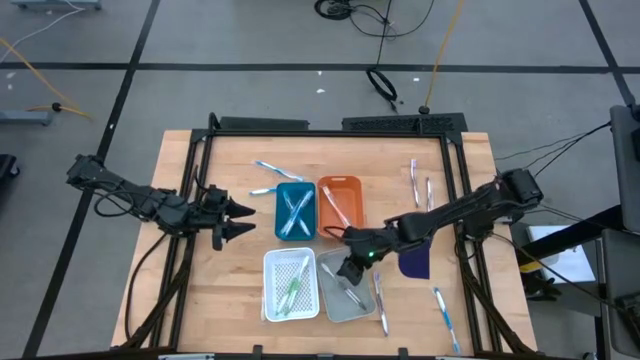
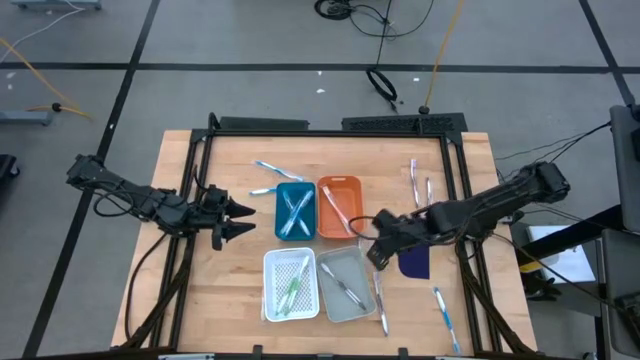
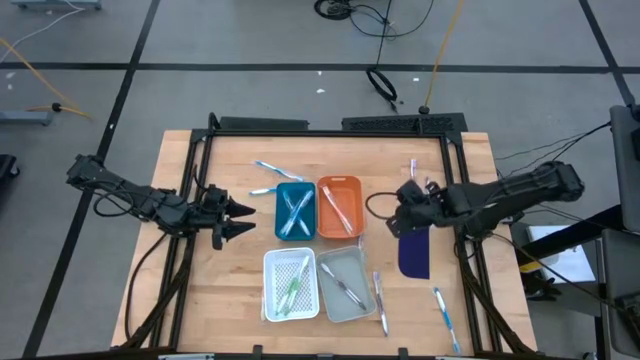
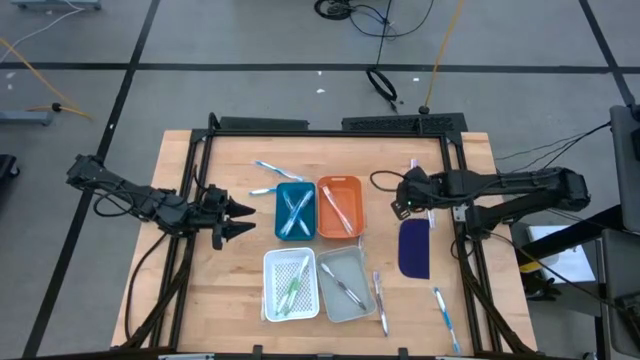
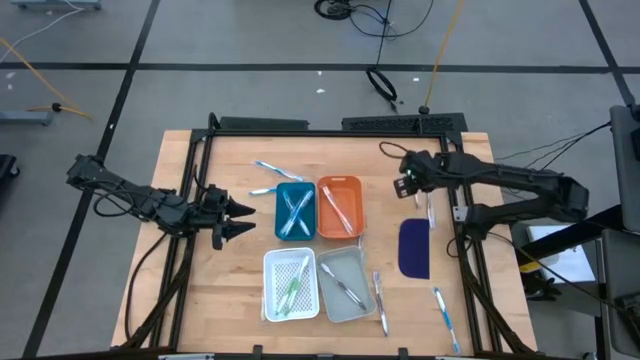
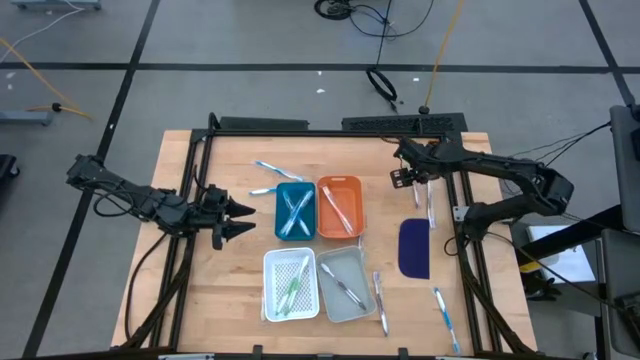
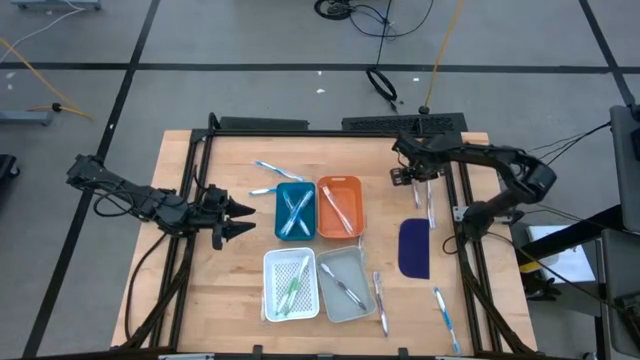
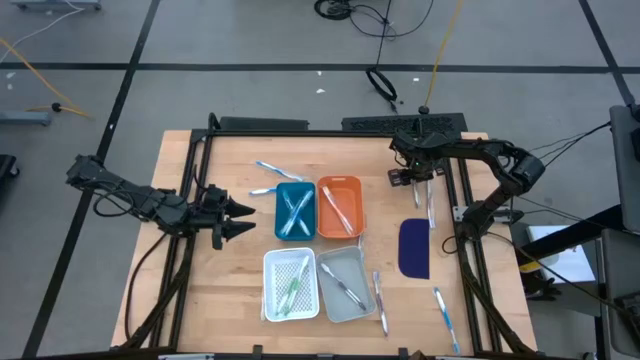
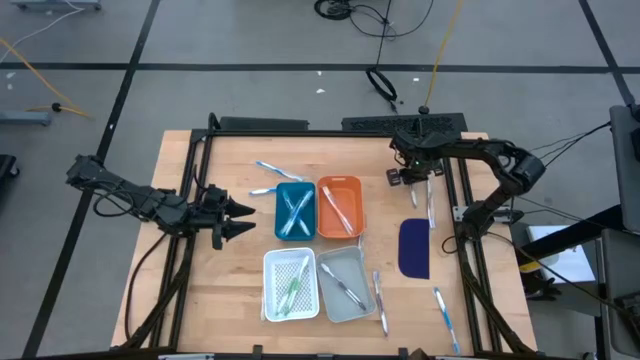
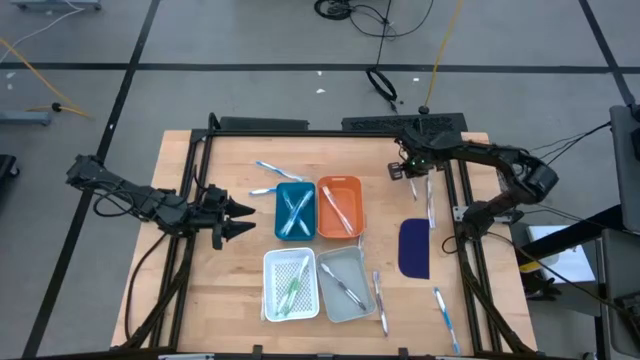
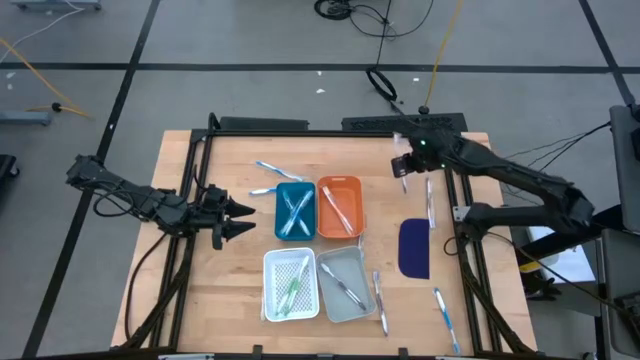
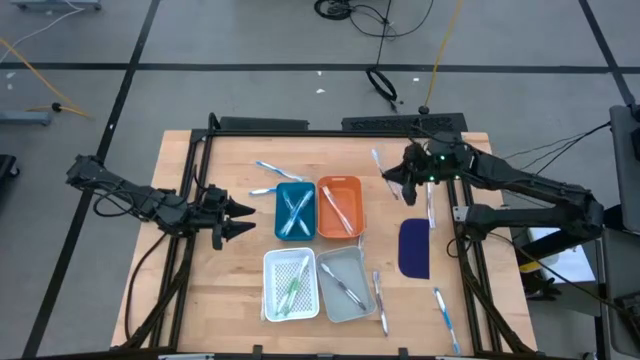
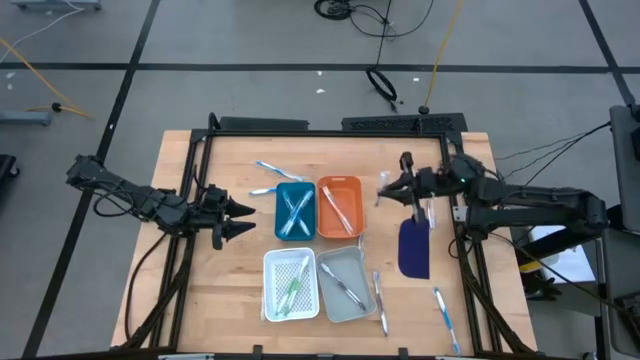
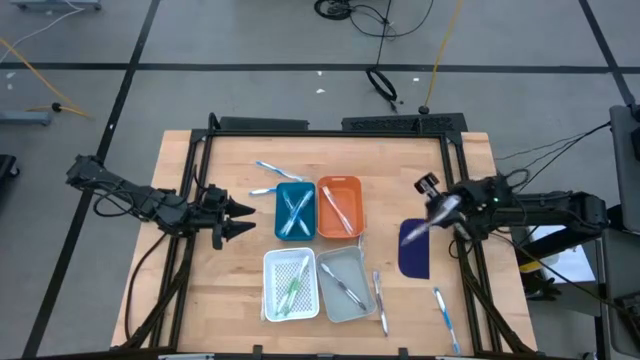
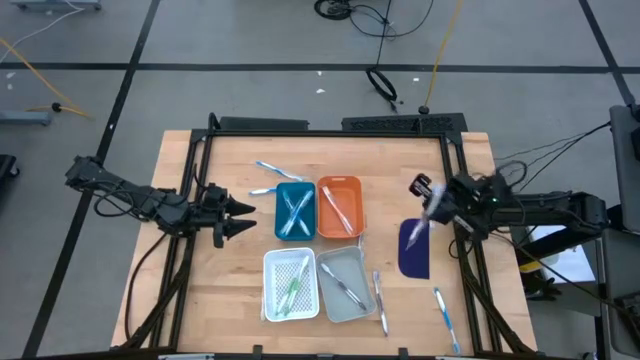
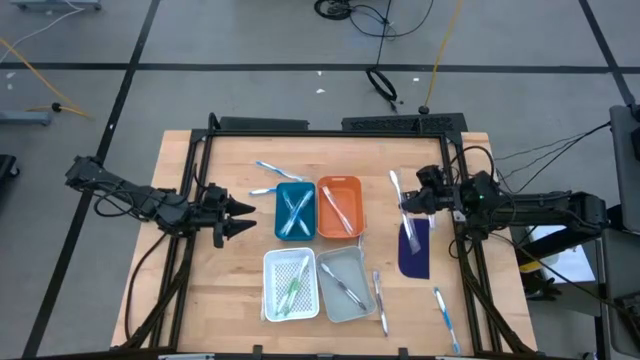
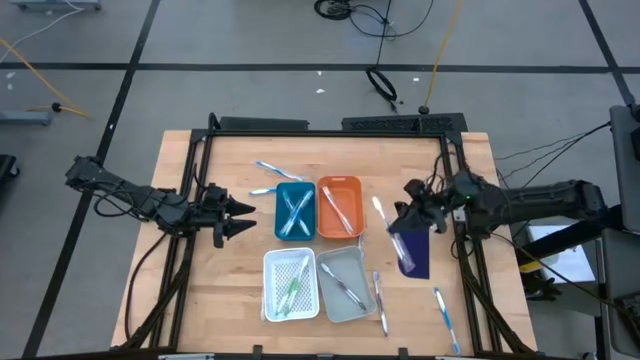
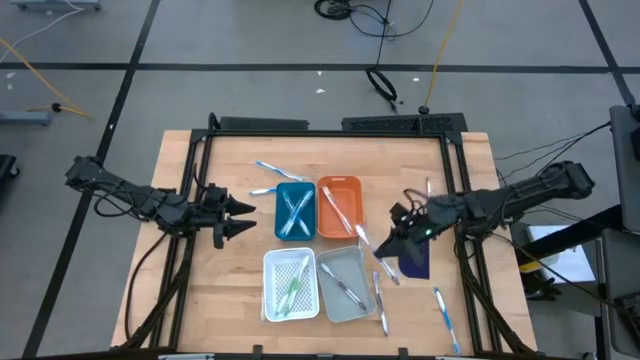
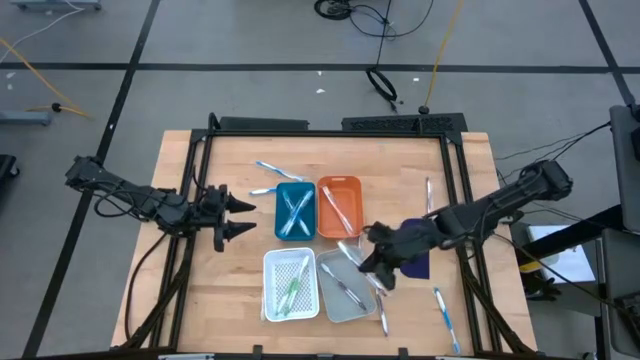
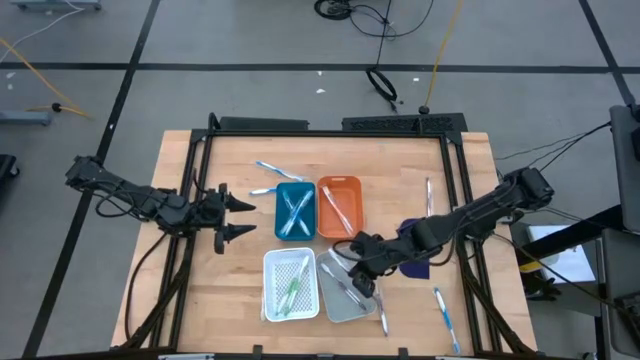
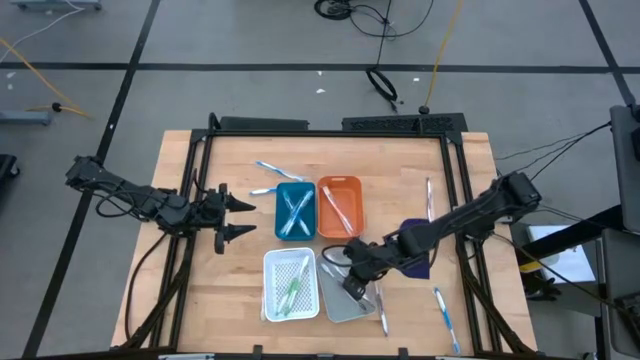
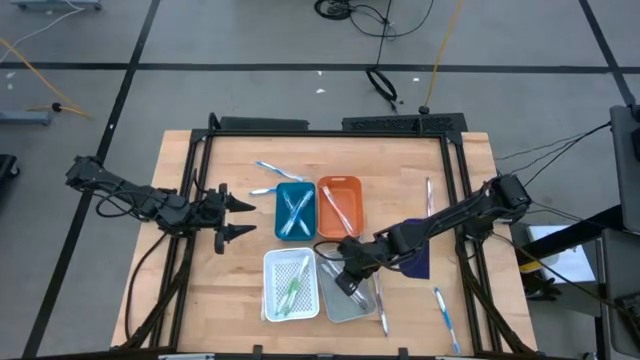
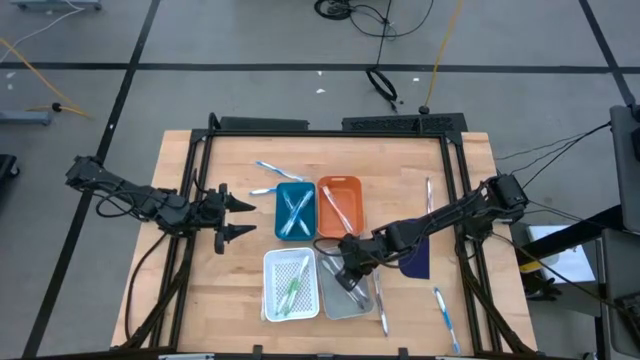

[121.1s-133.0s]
Task: Pick & Place Toothbrushes
Put the purple toothbrush into the gray bin

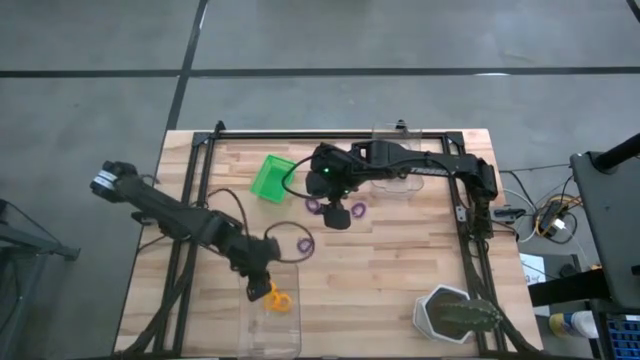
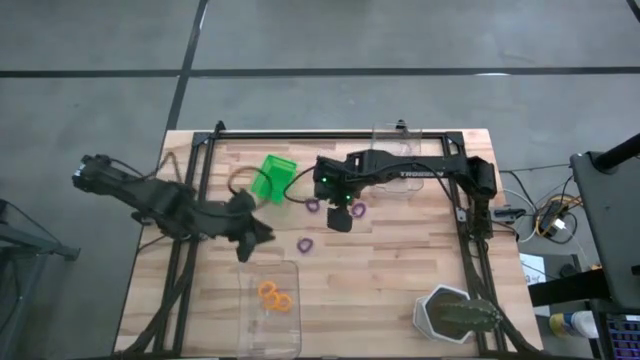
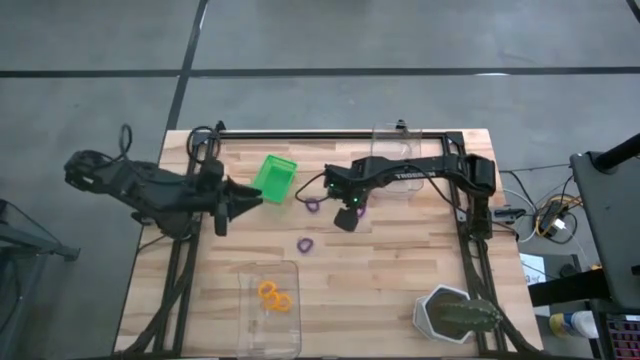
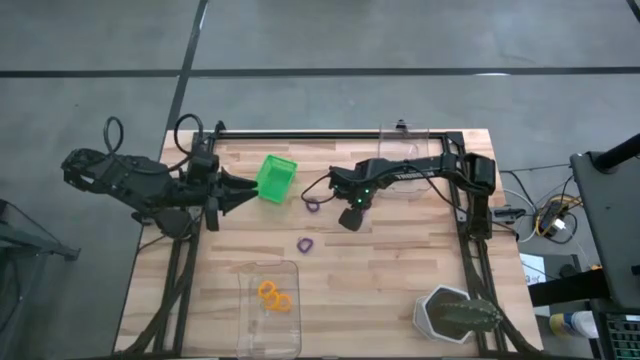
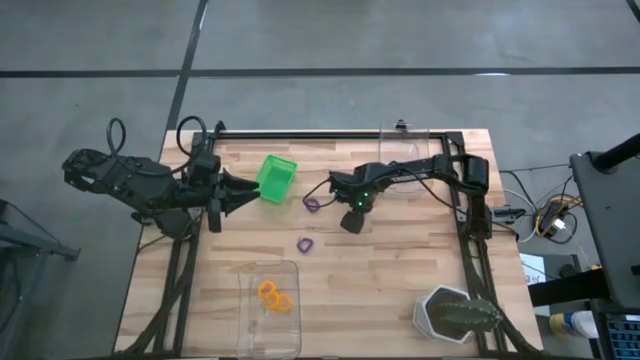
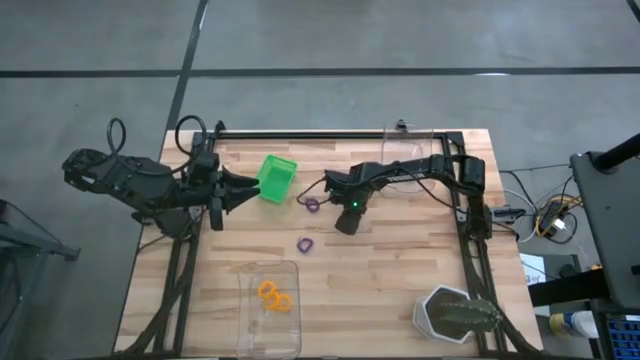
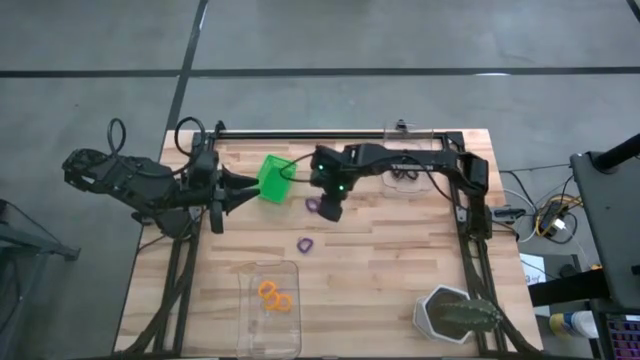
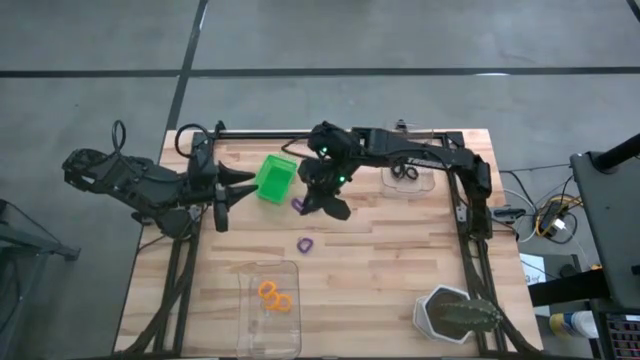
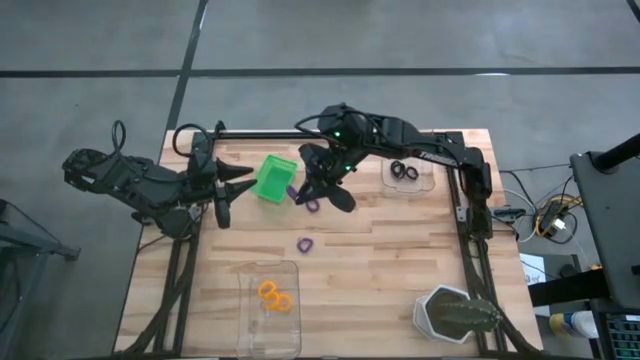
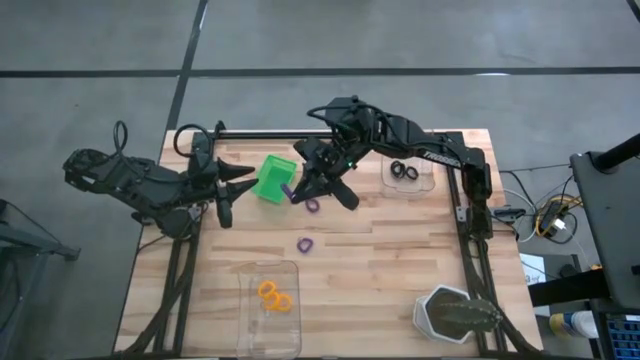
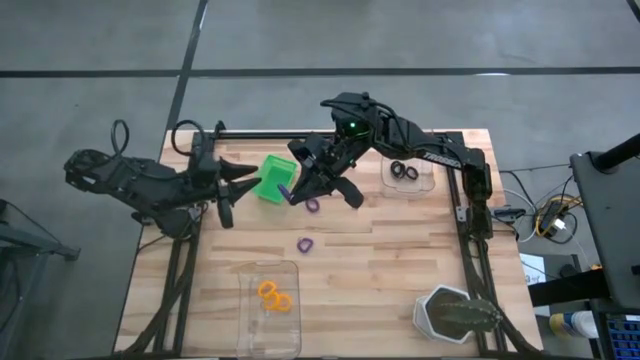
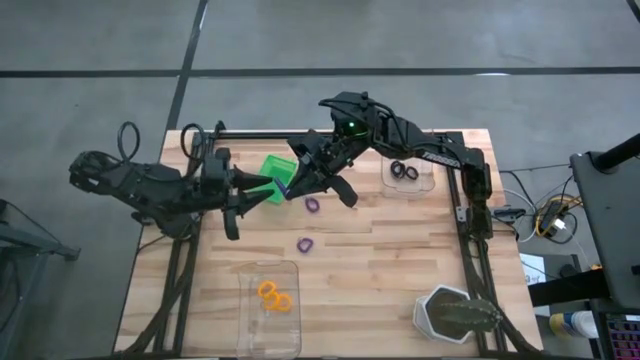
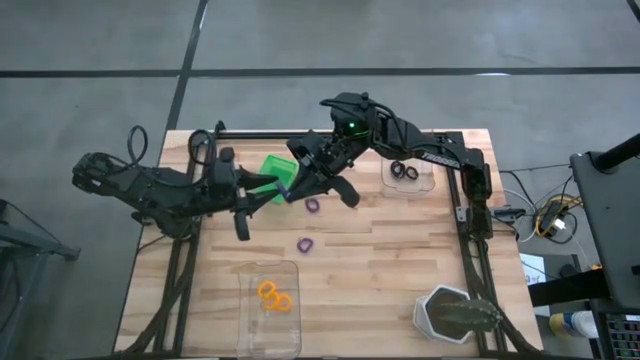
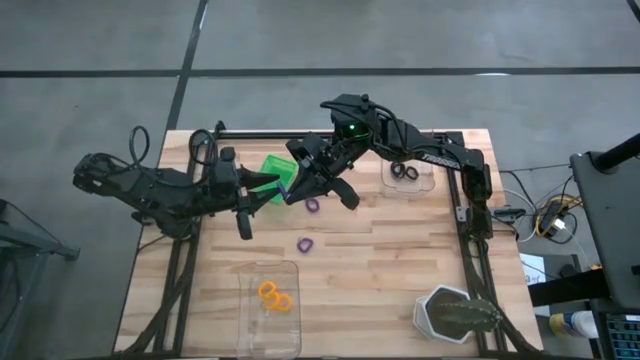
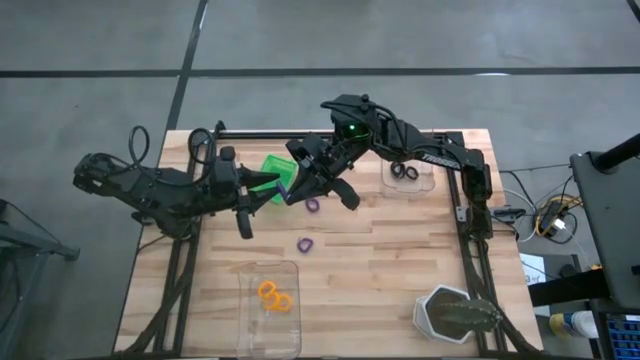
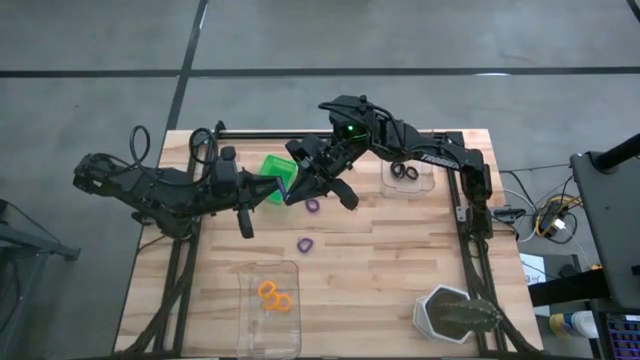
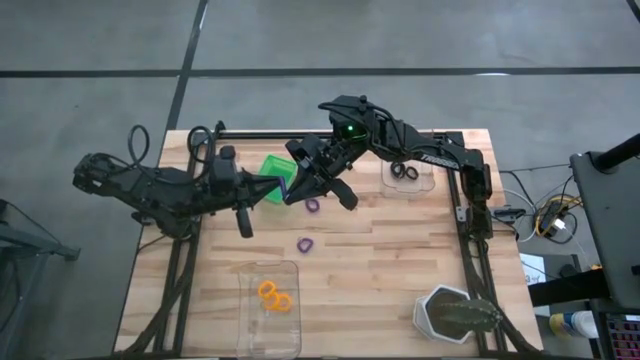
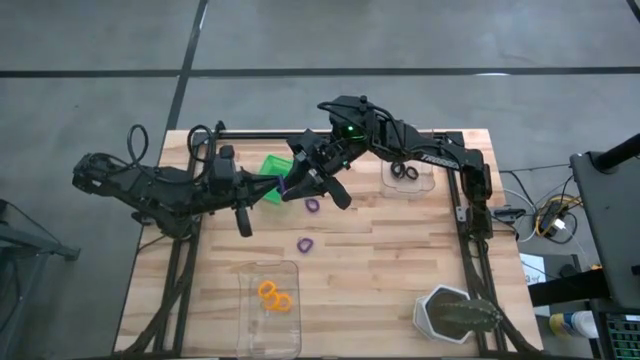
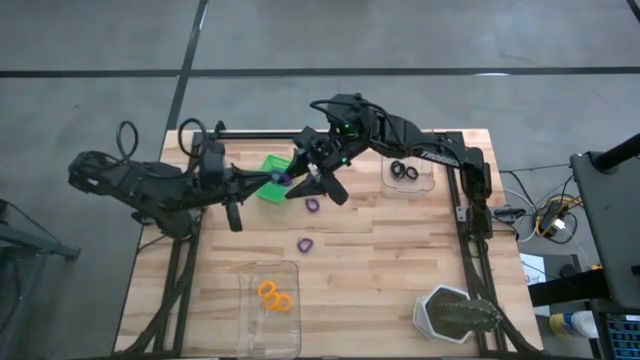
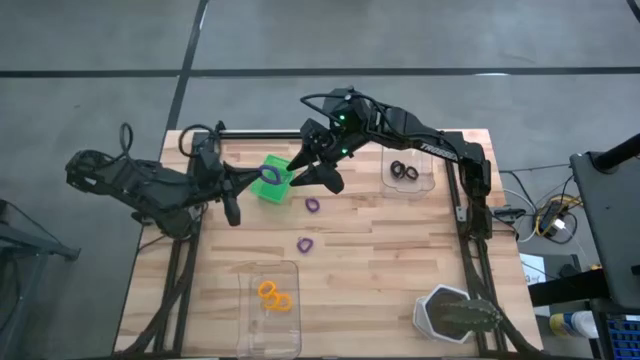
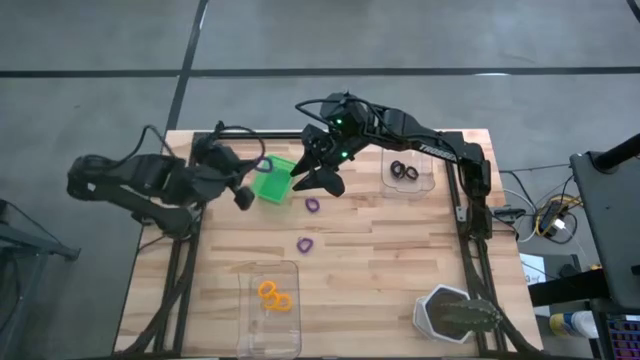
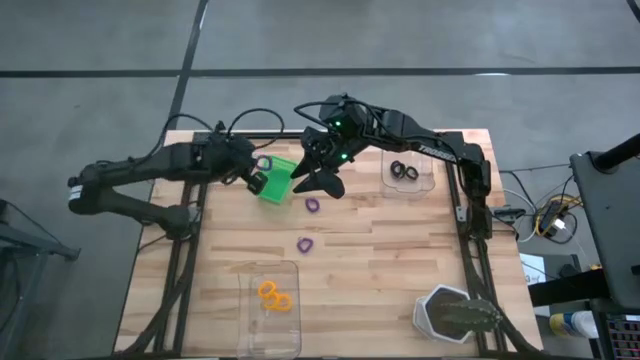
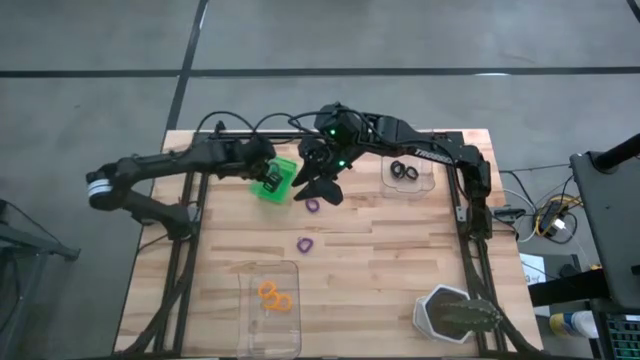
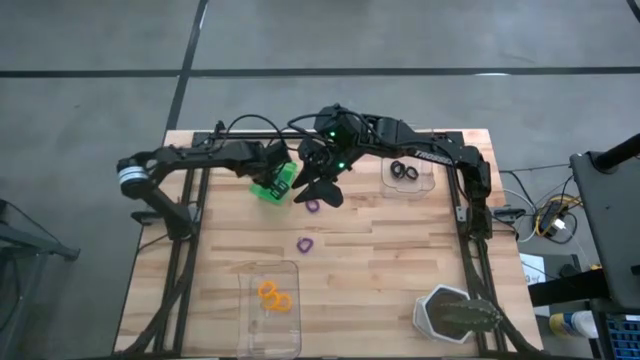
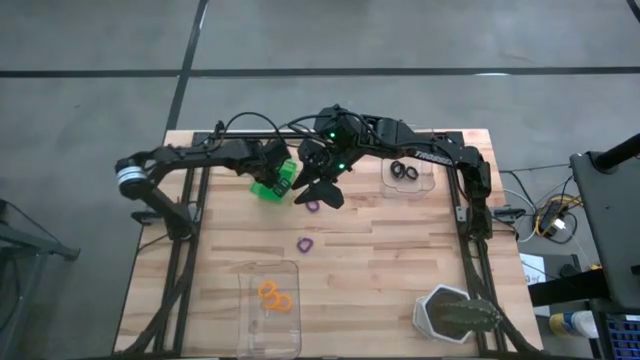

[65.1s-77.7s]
Task: Sort spring keychains
Put the top right purple spring keychain into the green bin
